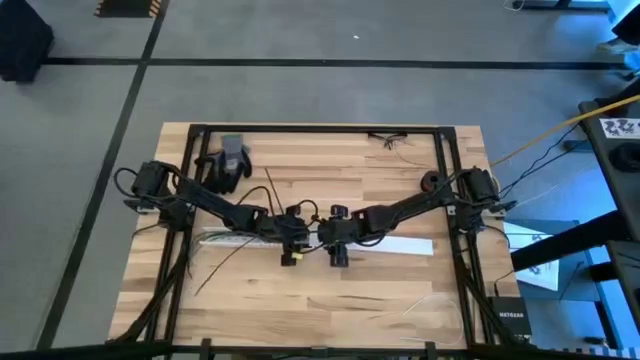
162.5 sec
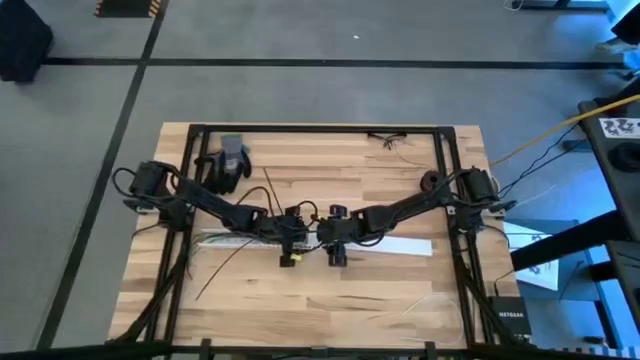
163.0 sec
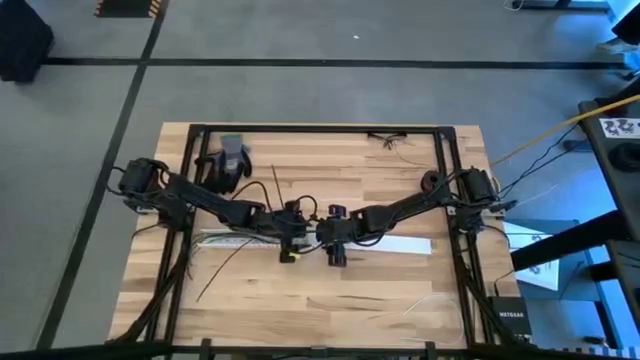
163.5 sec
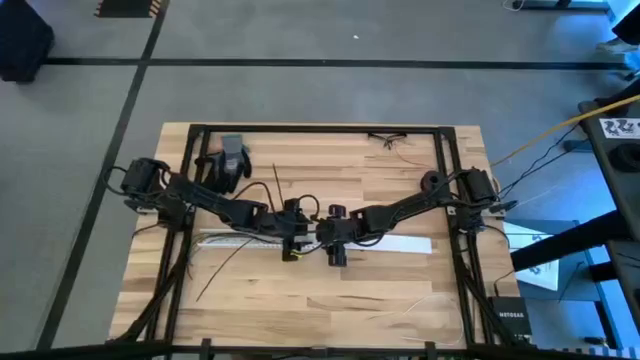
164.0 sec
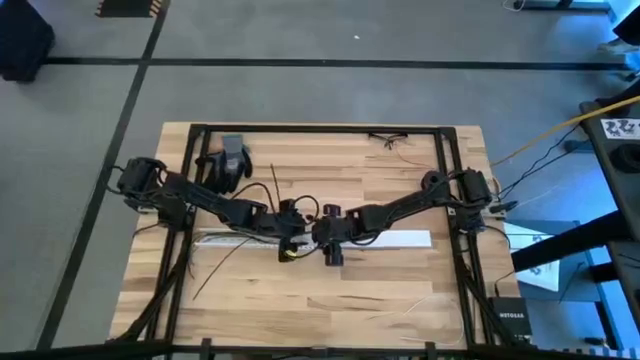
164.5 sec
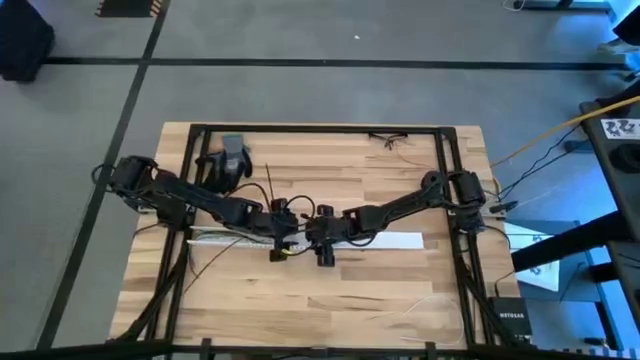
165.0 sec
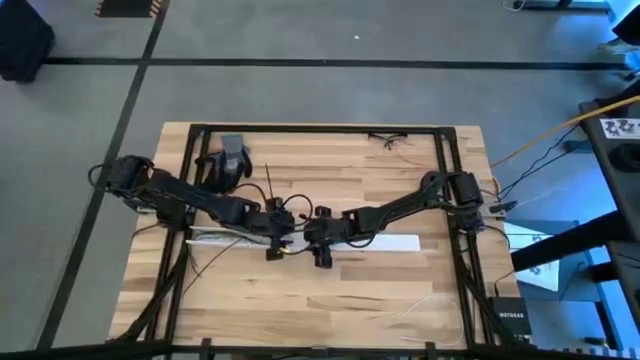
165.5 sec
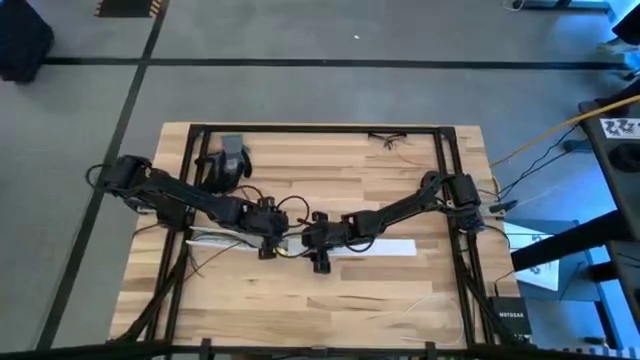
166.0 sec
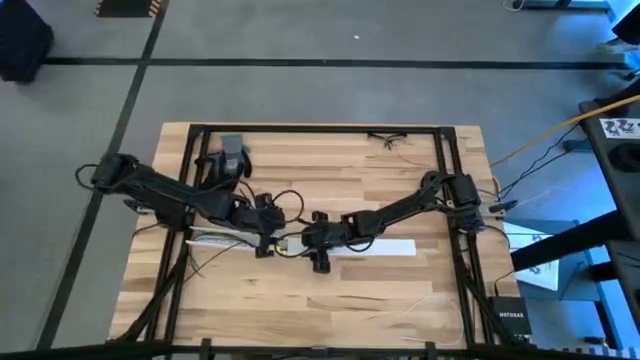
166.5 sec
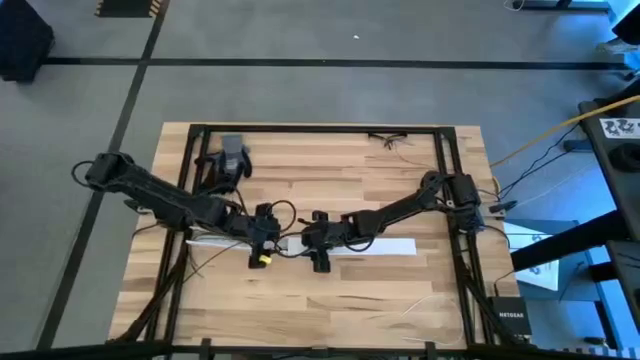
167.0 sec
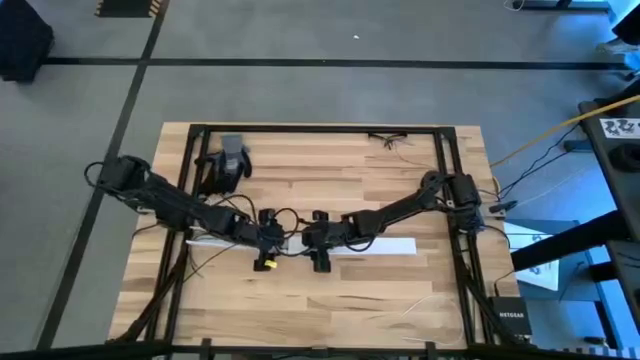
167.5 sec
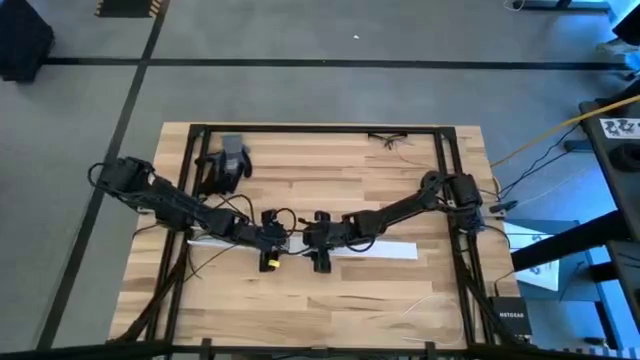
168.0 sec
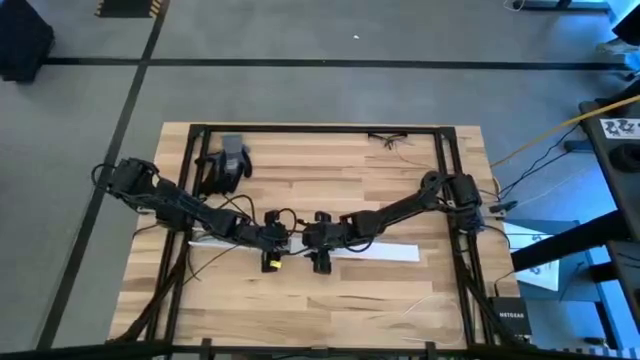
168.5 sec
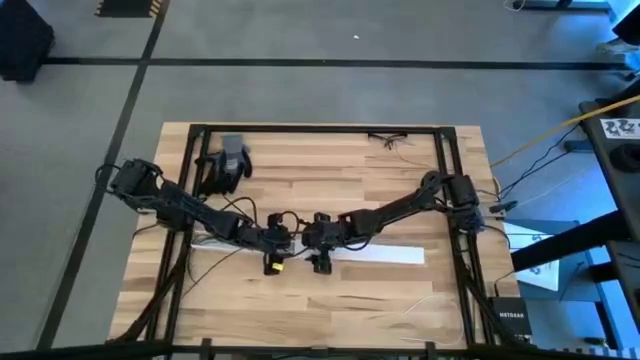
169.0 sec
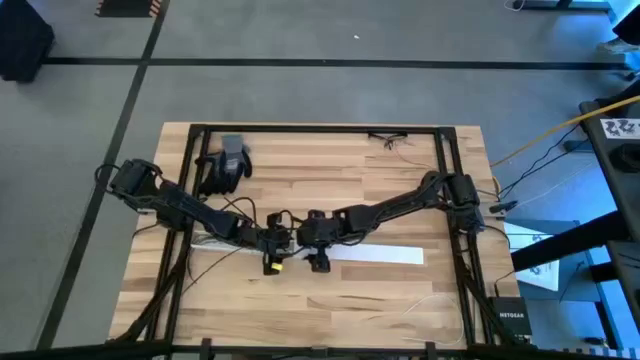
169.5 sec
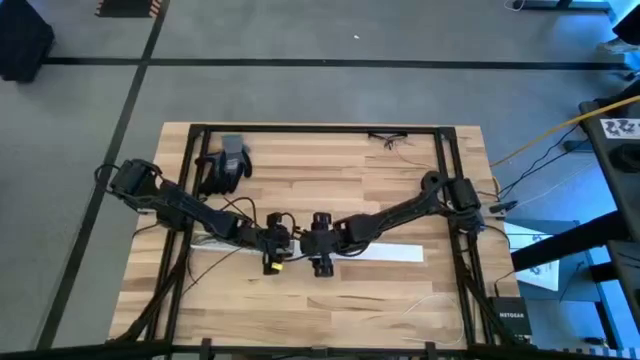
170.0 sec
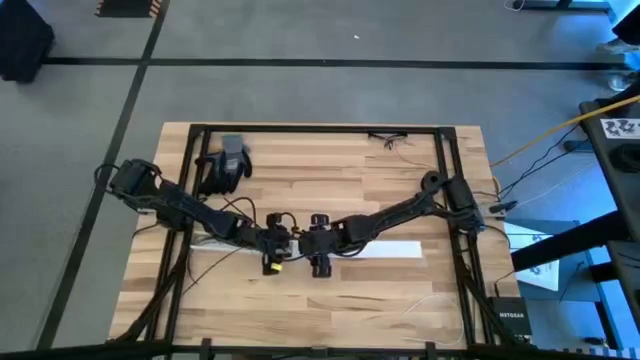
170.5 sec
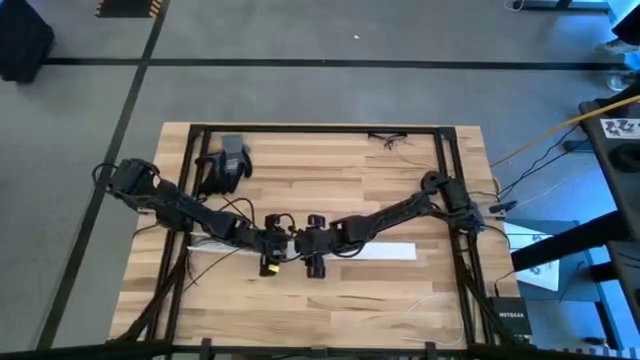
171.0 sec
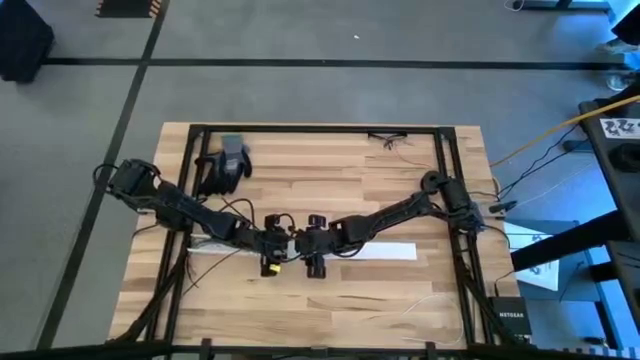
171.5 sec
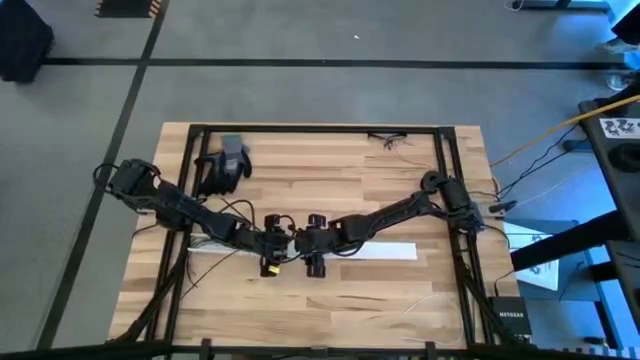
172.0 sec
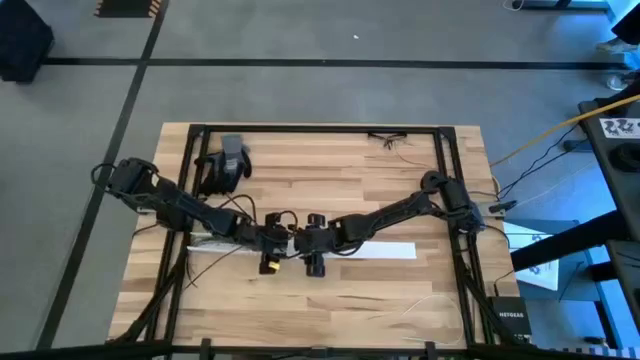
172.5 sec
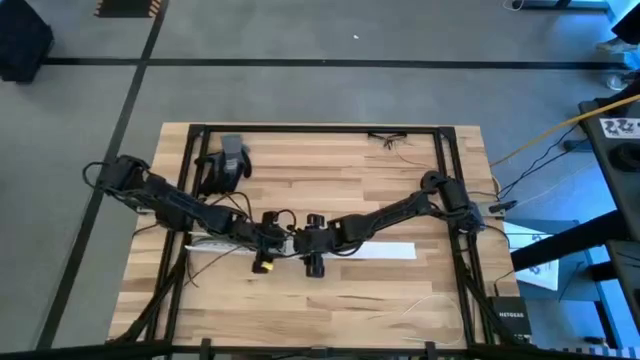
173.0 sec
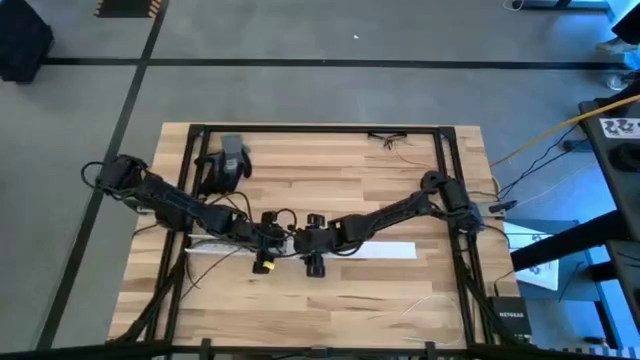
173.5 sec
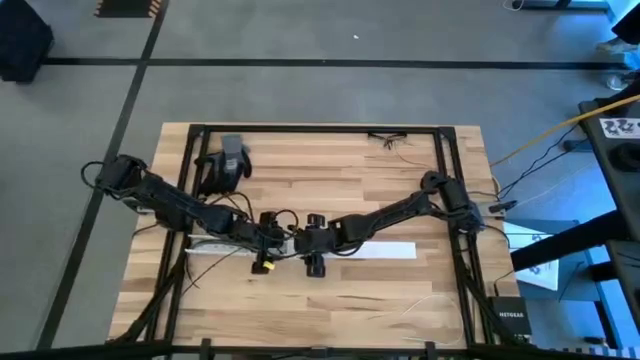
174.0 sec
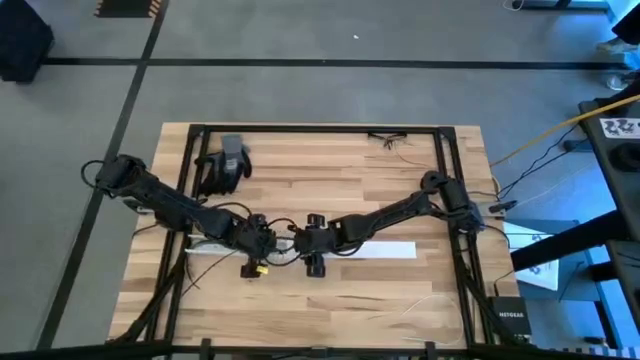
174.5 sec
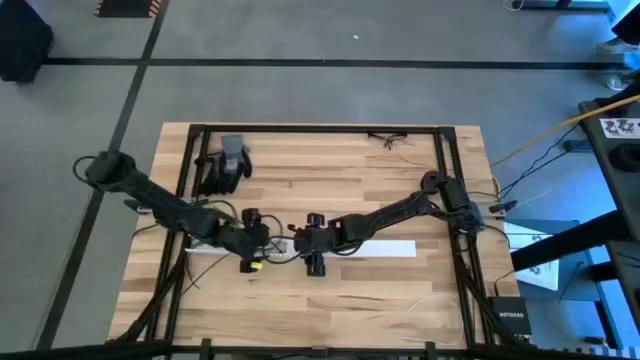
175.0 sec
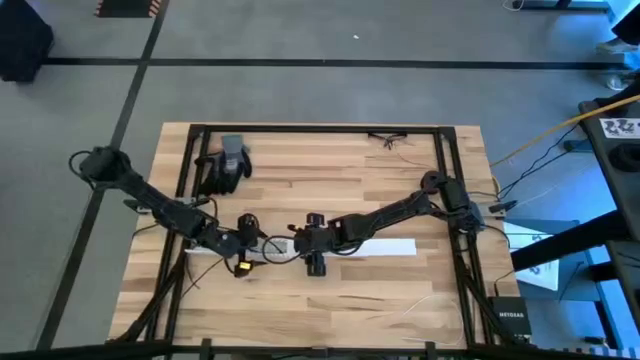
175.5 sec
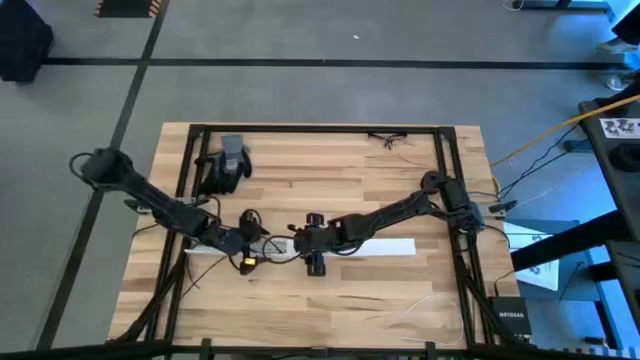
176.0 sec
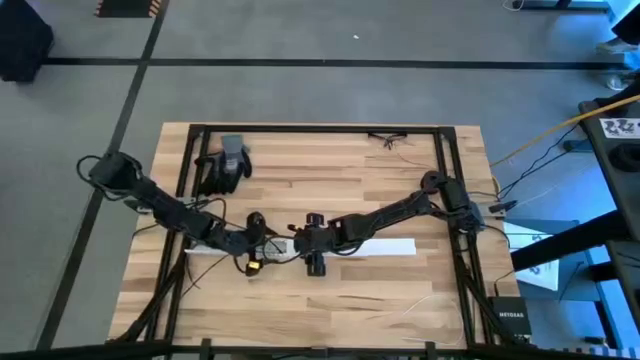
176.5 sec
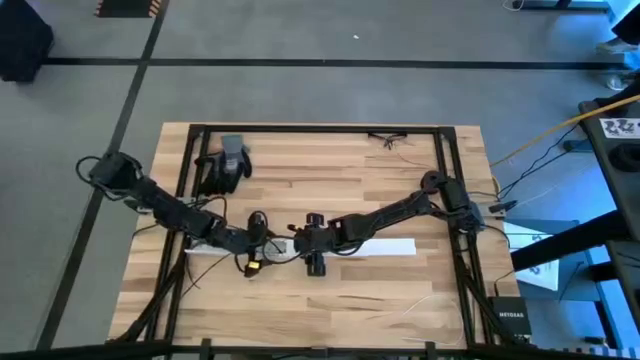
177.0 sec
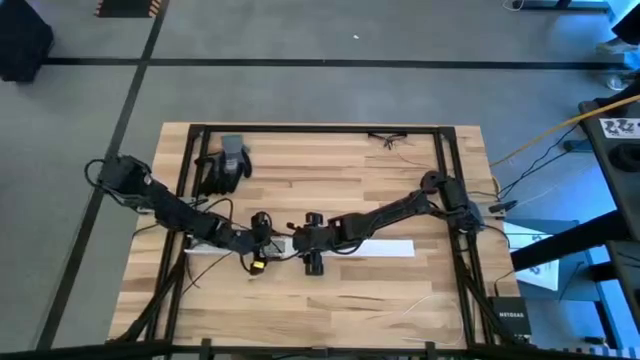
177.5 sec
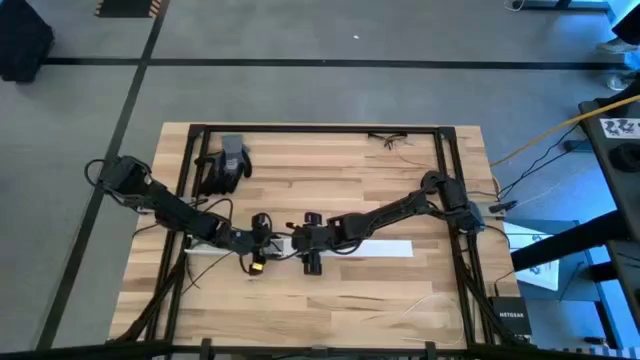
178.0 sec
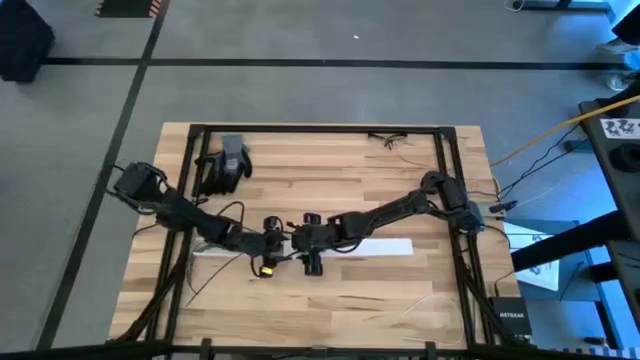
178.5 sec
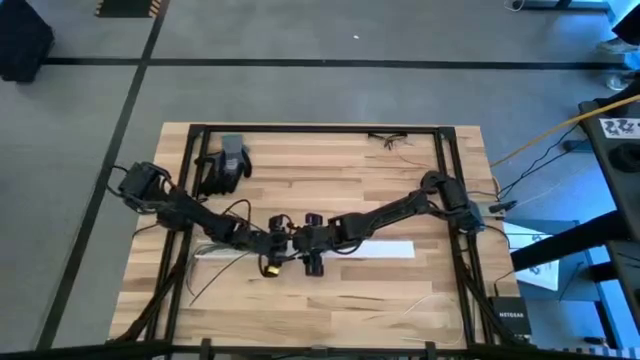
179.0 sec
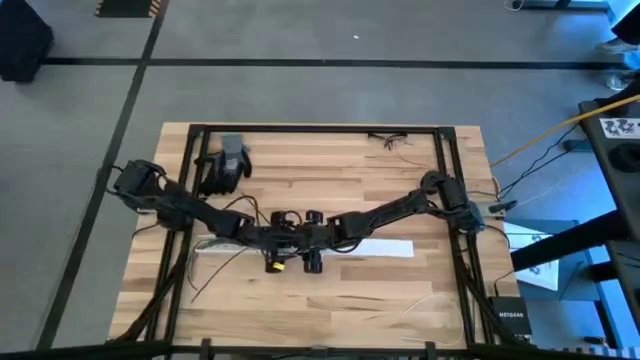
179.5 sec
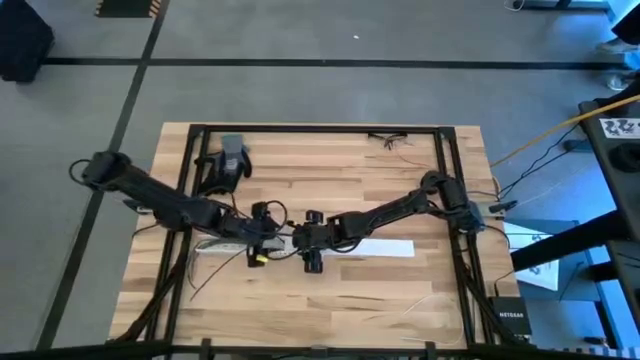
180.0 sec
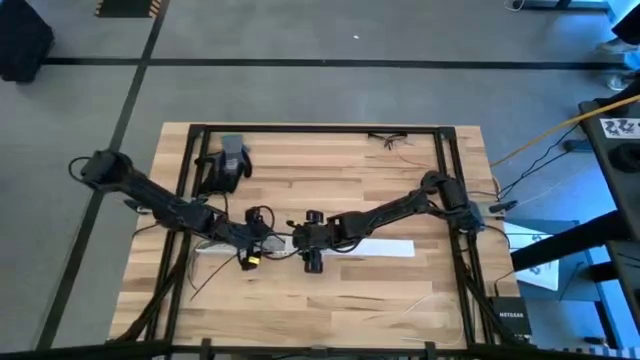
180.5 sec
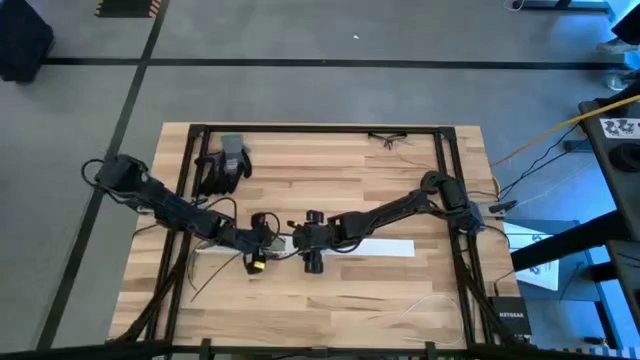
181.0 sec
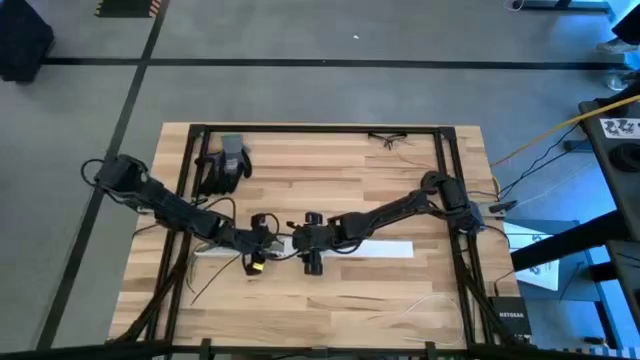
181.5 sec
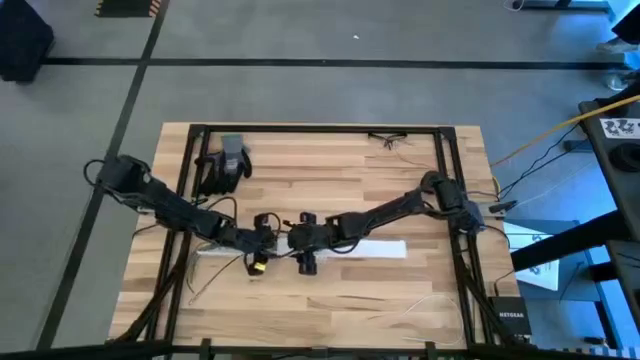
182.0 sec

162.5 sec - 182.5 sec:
Task: Ziptie cables
Close the cable duct

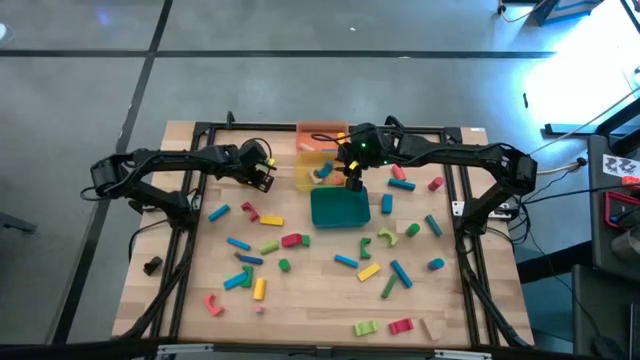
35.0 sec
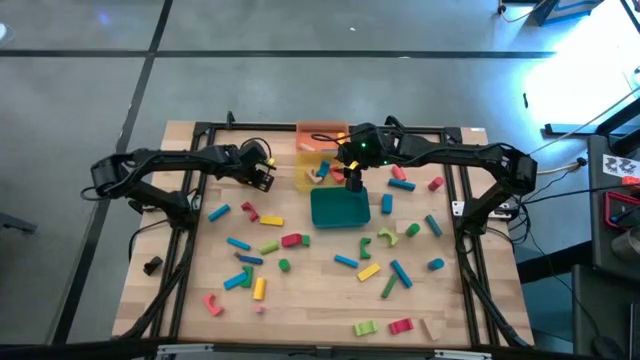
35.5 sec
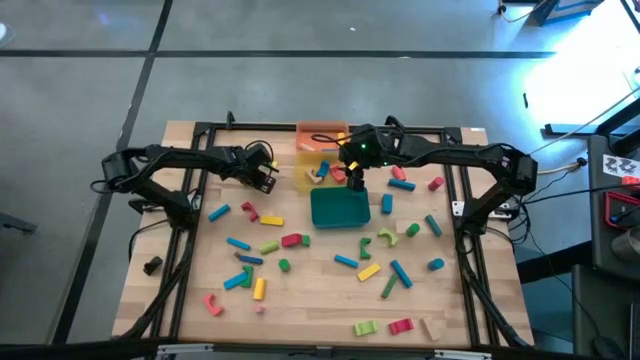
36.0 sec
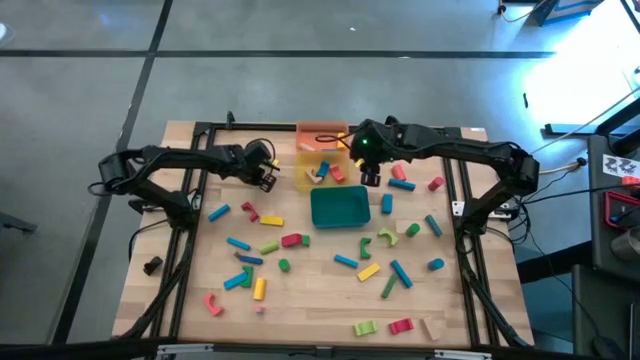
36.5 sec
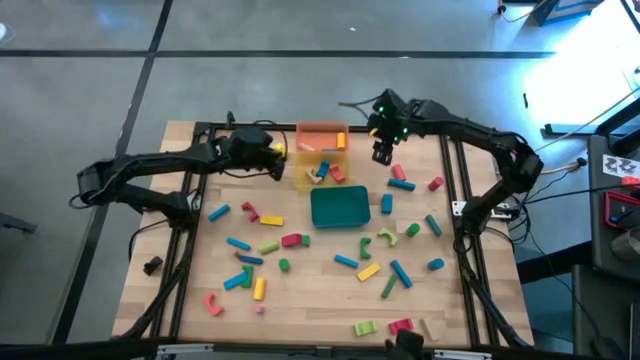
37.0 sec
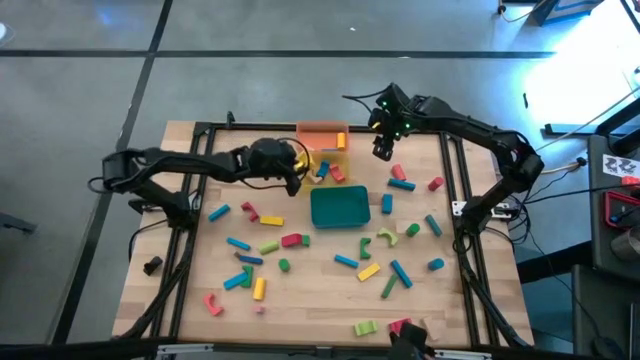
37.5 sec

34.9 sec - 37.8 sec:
Task: Sort blocks by size
Put the yellow arch block into the yellow bin
